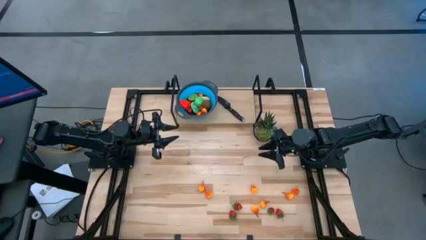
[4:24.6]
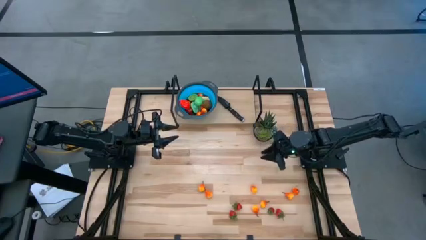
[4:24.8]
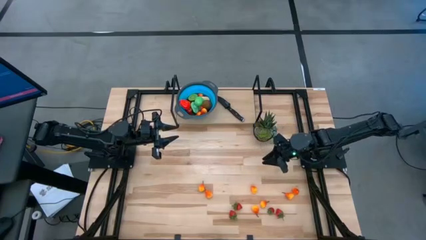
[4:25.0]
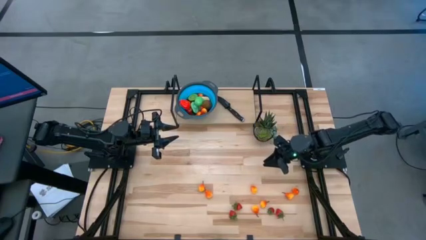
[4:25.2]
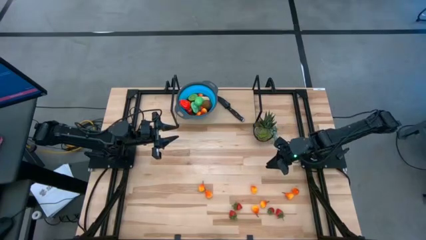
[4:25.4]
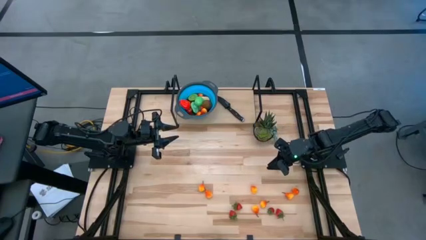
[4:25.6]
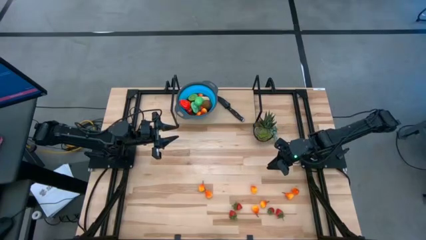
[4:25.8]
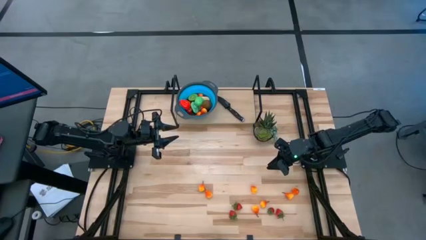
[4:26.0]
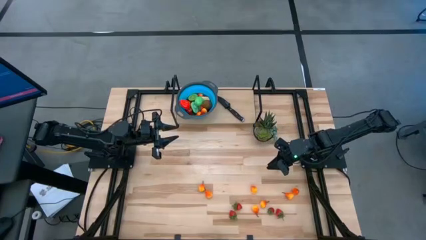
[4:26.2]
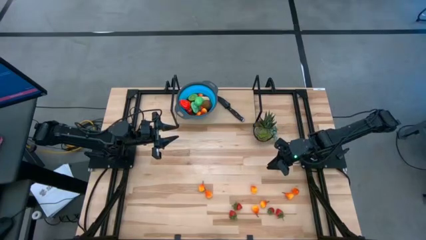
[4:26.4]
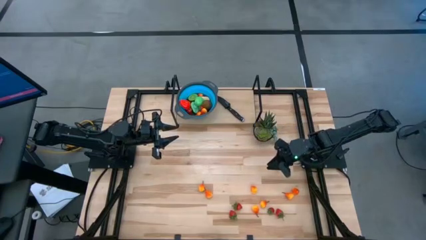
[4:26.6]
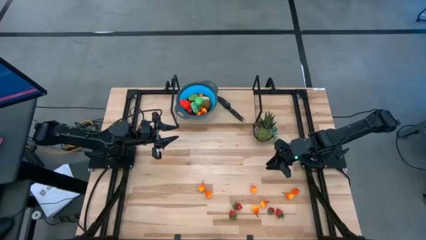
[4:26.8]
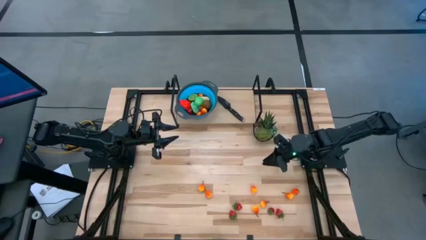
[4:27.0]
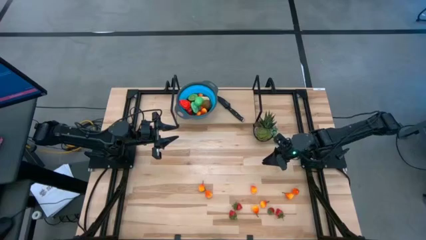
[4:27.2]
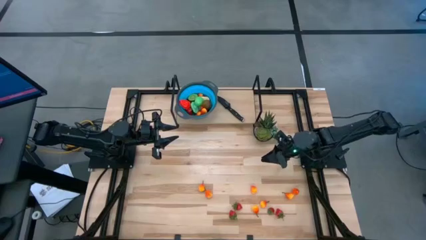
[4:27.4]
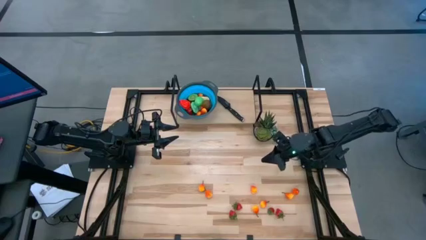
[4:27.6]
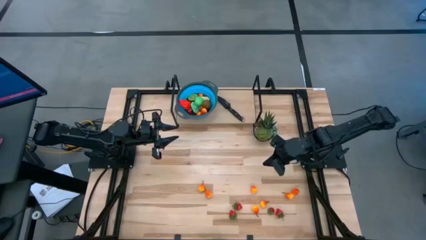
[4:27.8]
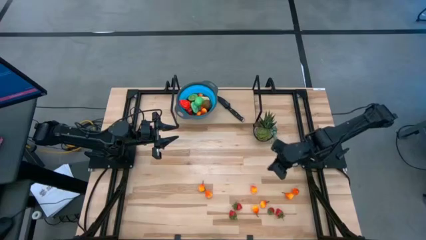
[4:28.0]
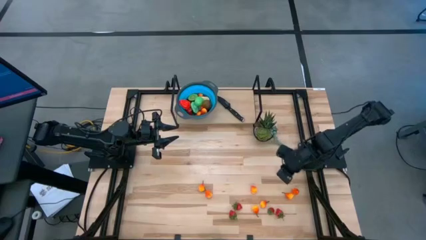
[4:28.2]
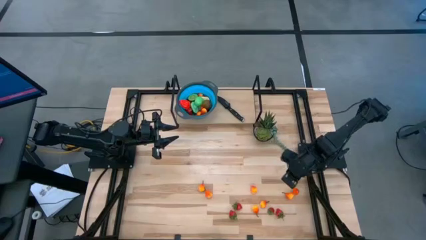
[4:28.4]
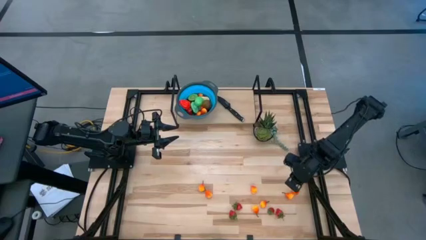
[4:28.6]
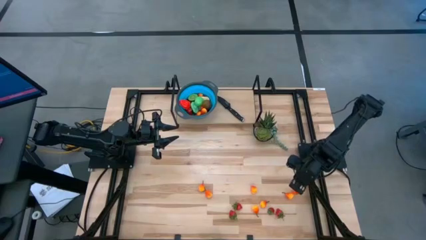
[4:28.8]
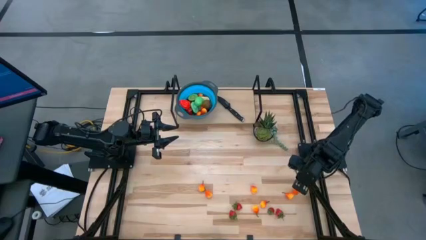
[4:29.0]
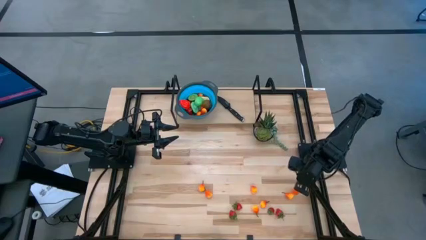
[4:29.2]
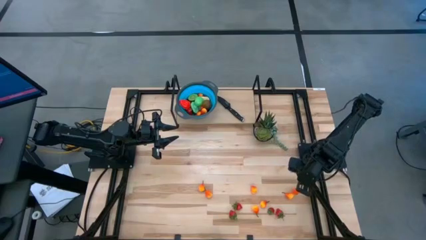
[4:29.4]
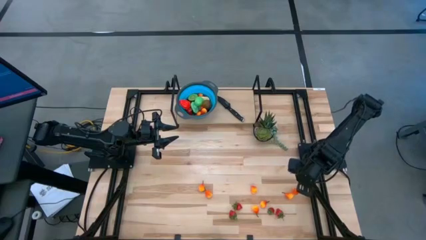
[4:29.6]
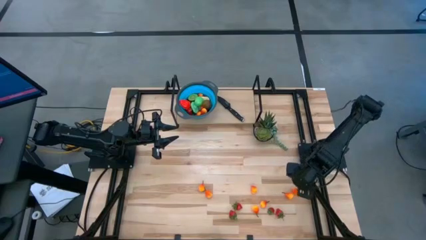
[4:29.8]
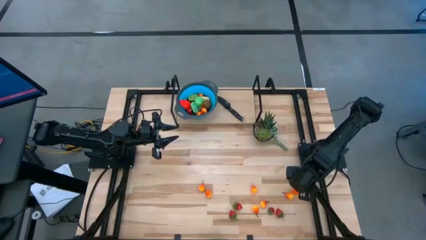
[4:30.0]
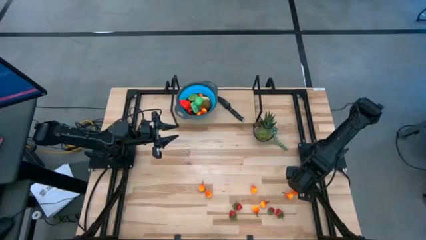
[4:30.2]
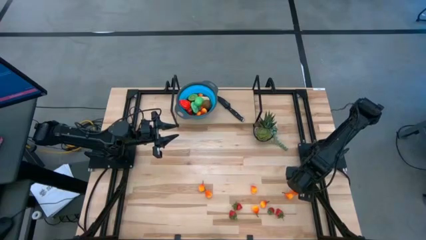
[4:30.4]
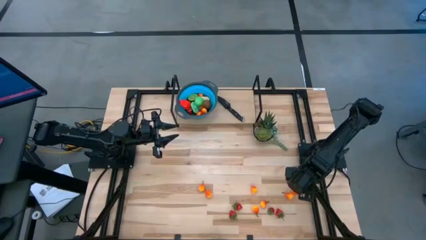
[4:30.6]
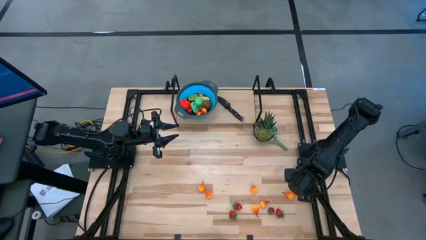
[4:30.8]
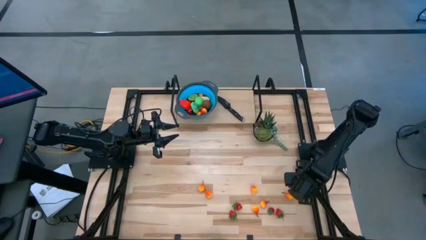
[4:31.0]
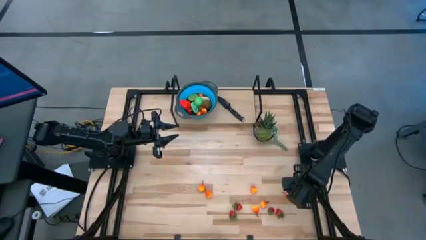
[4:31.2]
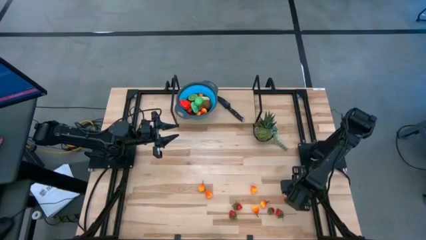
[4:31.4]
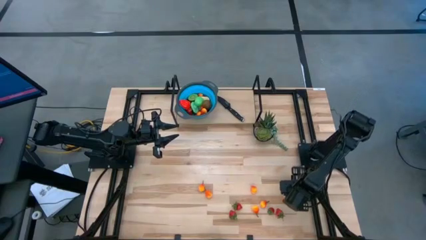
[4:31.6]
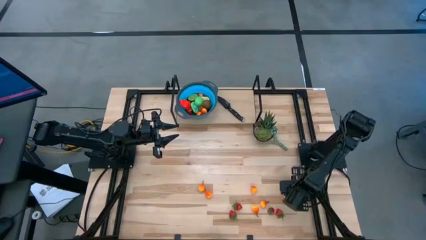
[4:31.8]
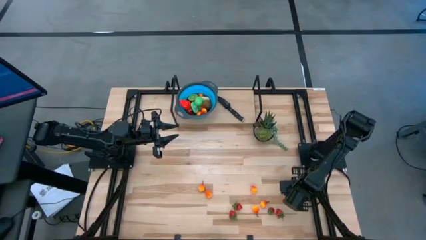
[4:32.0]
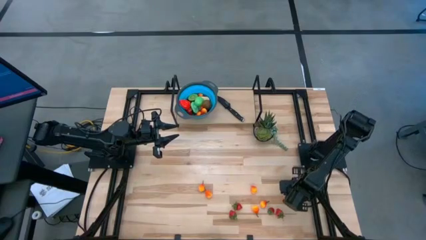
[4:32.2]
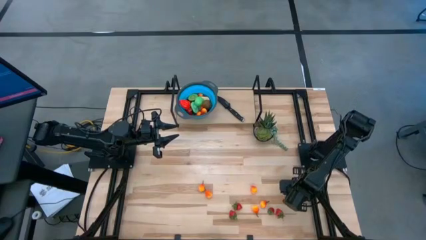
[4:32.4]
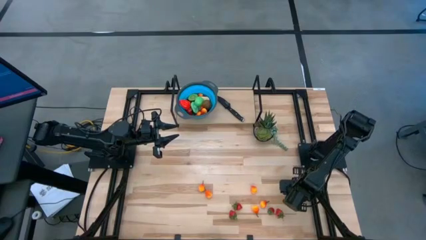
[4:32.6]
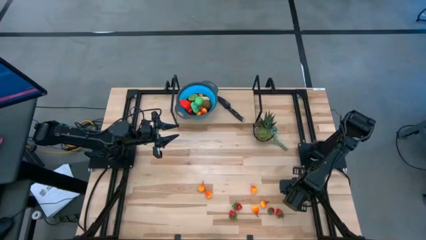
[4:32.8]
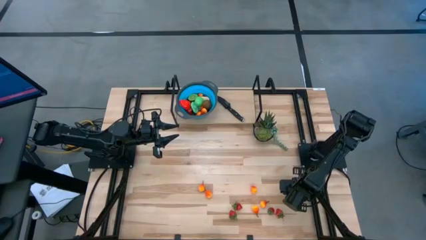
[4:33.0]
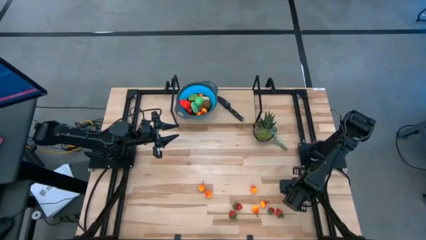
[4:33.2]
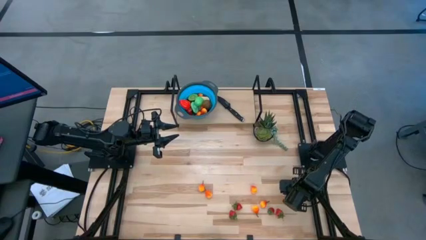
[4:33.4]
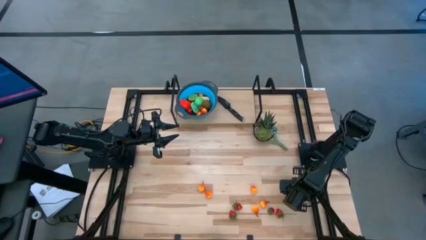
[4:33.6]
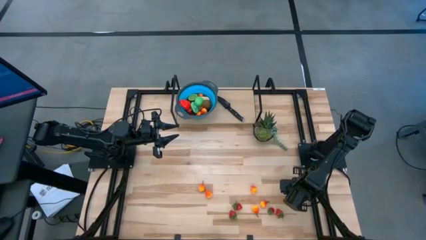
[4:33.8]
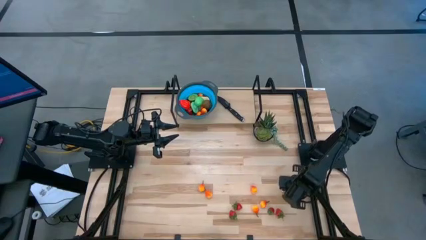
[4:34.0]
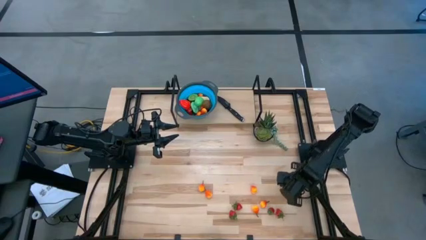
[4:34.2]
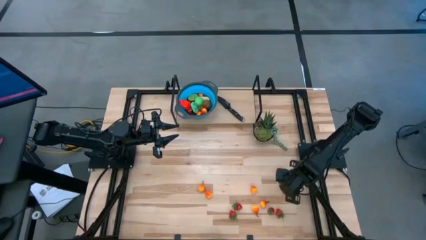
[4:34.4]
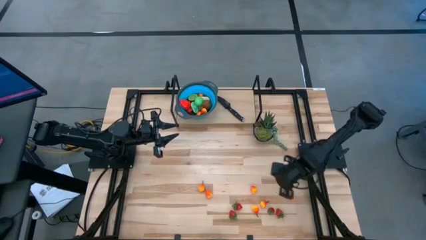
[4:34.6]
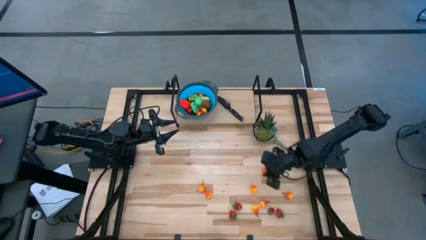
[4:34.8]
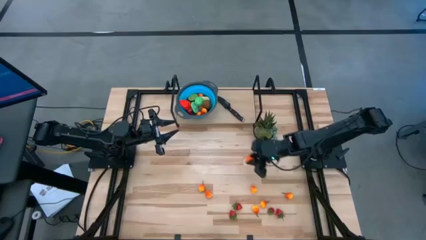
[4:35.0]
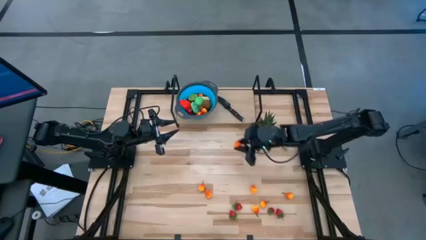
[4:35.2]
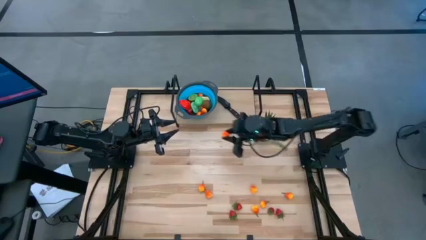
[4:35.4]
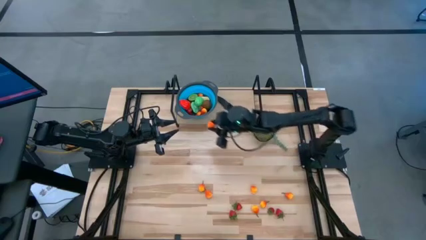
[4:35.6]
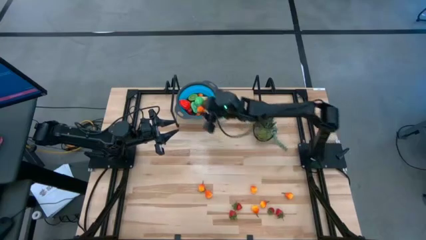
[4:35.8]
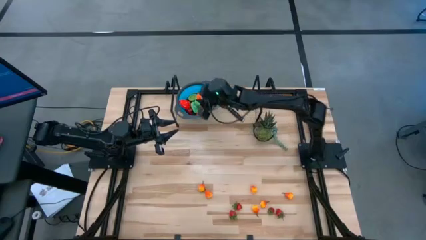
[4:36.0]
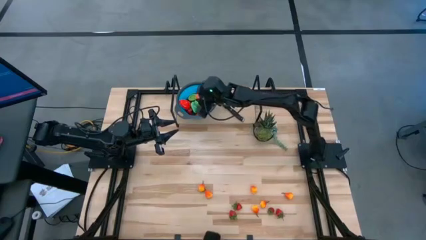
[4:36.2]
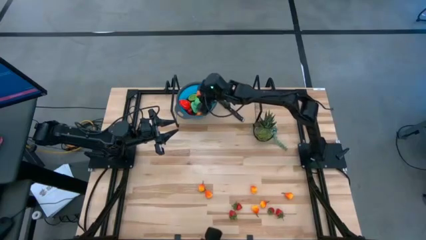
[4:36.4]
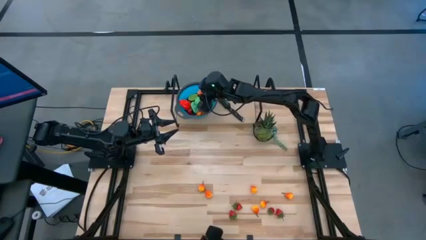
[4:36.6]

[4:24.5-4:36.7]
Task: Pick & Place Fruit
Put the pear into the basket

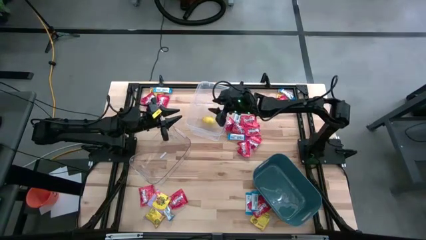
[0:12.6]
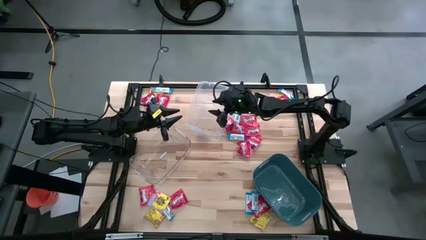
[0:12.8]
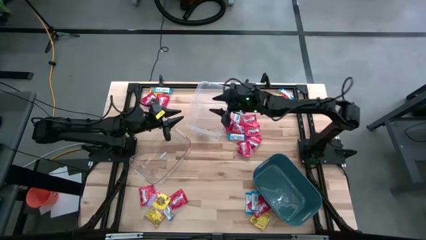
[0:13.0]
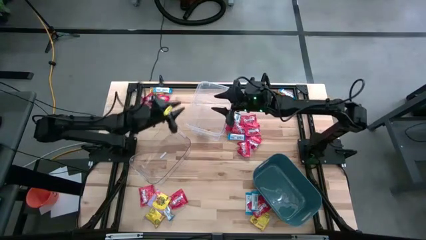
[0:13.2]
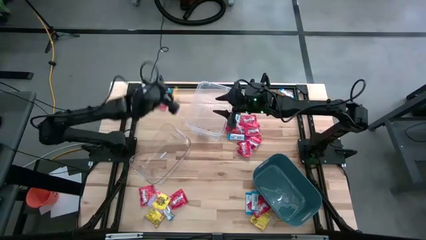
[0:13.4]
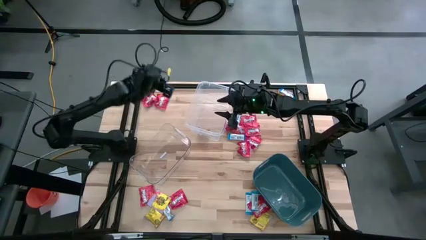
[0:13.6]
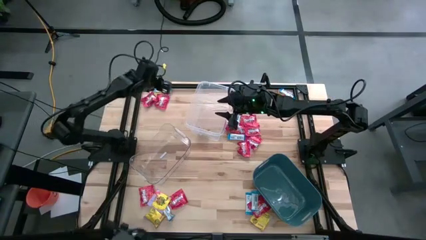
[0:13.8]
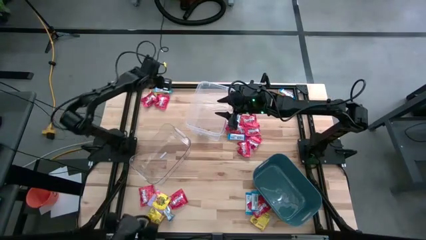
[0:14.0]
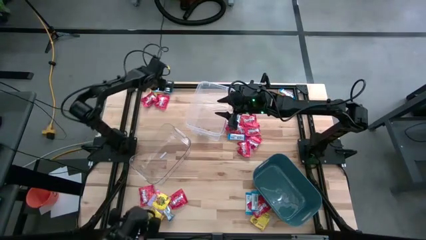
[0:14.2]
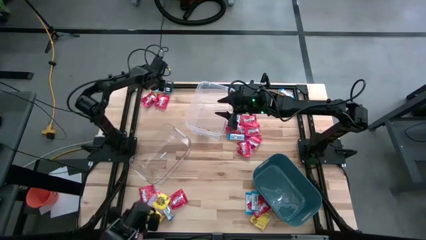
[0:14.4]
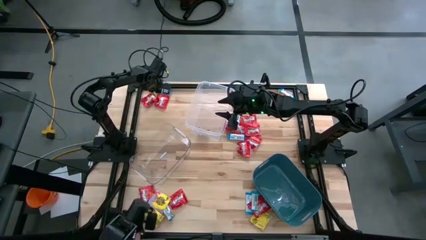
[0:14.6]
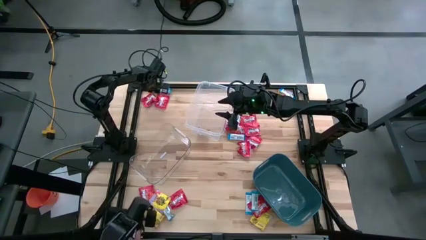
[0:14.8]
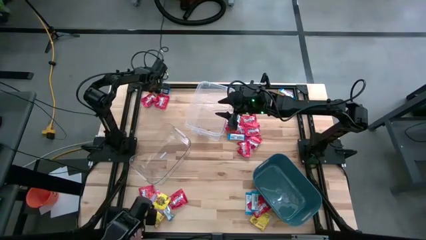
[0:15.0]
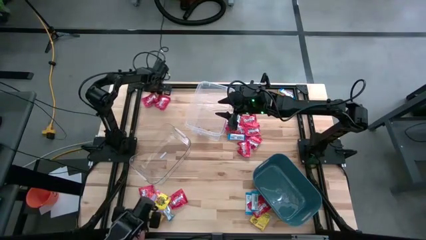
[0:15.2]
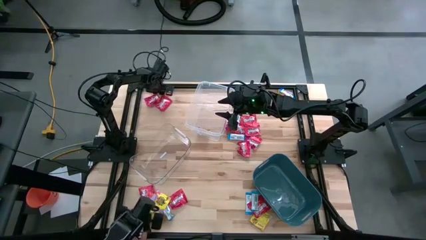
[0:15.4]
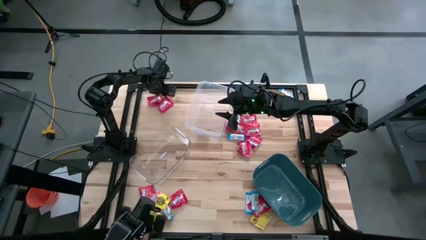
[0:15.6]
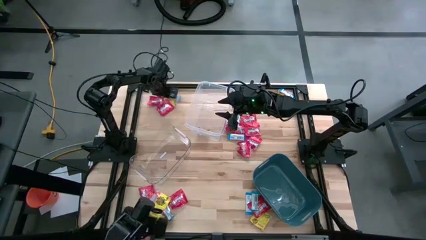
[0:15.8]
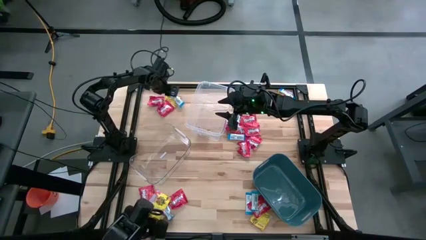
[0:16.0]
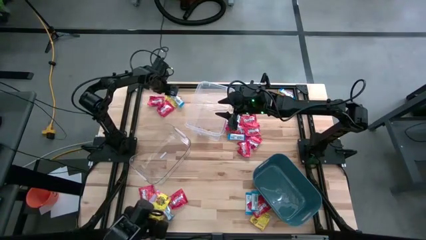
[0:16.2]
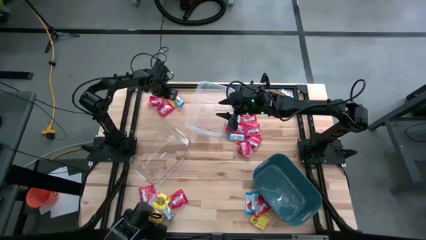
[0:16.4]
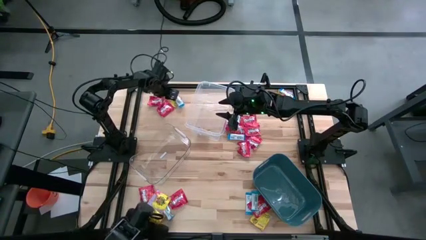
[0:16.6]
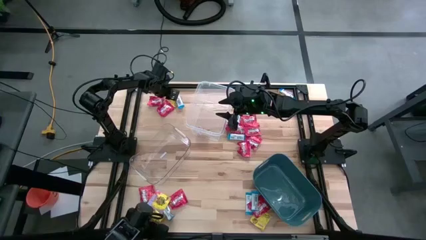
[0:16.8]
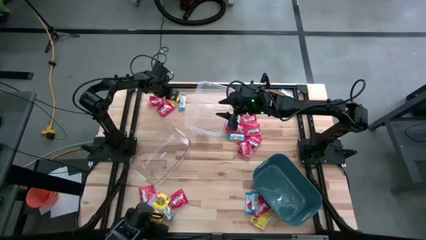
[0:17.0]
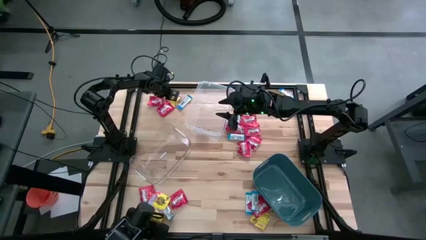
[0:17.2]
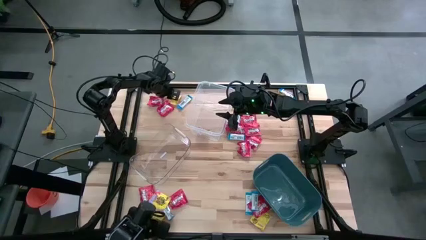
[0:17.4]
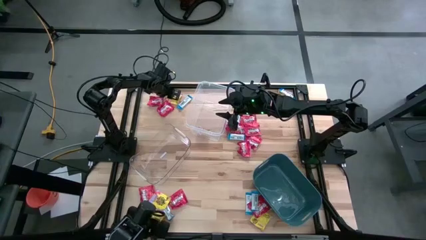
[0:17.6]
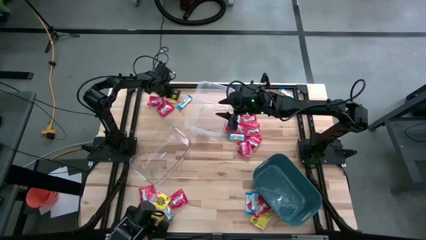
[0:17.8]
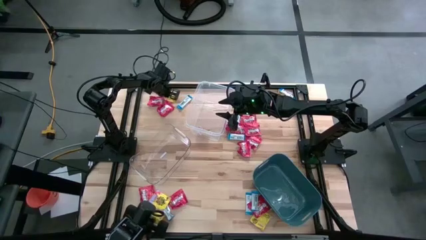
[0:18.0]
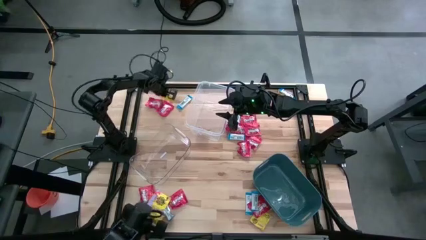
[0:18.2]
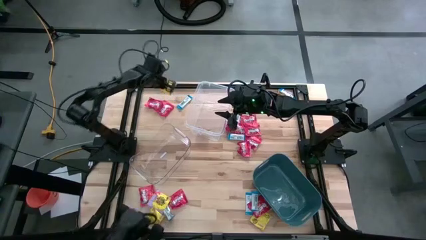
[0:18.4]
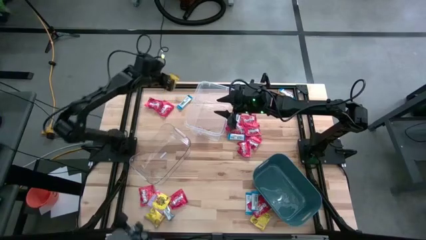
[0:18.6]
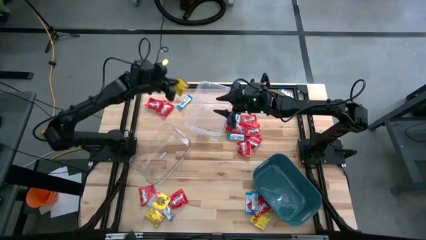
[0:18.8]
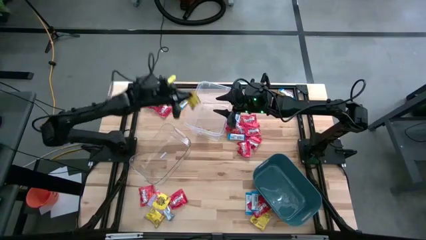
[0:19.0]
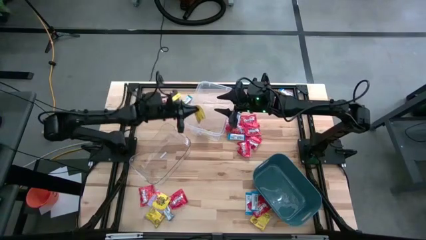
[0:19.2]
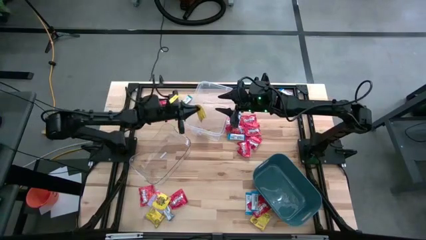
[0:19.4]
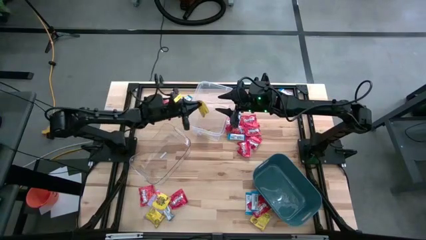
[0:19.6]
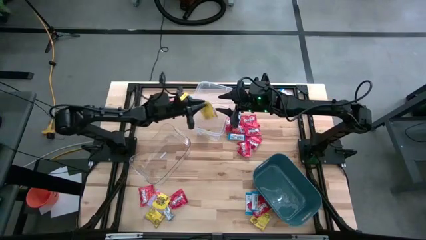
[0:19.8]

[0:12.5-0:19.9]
Task: Sort candy
Put the yellow candy into the transparent container
